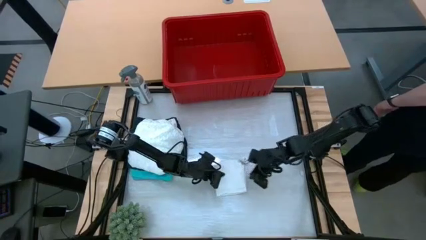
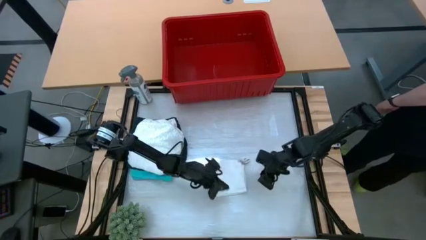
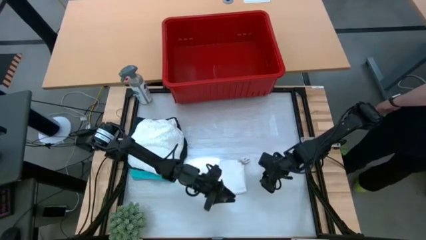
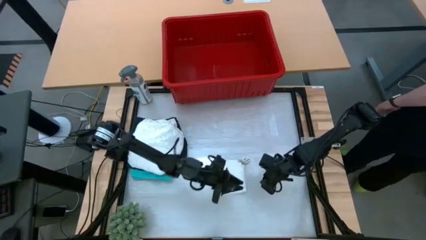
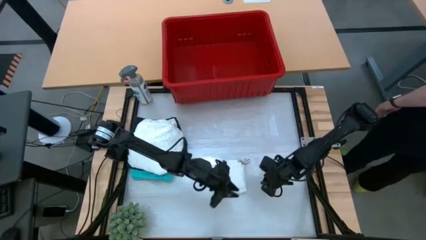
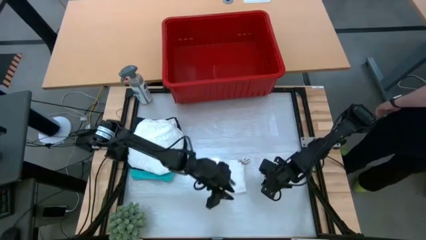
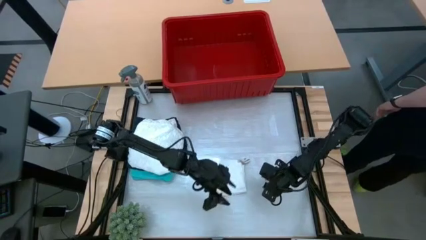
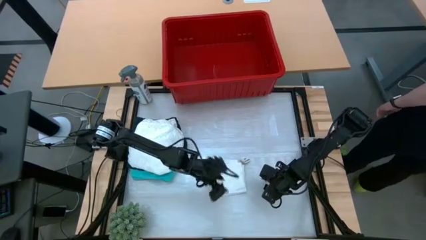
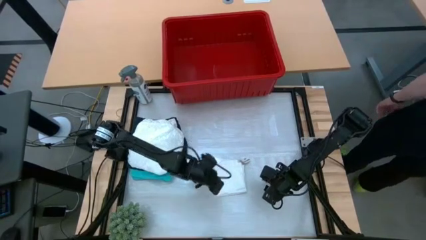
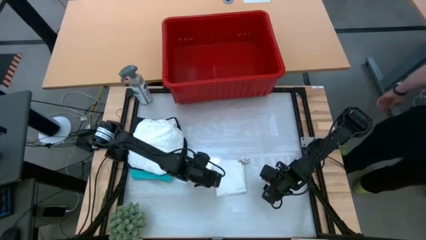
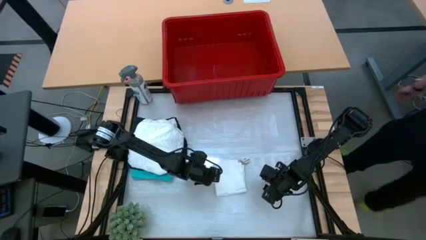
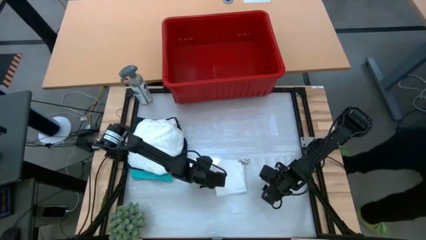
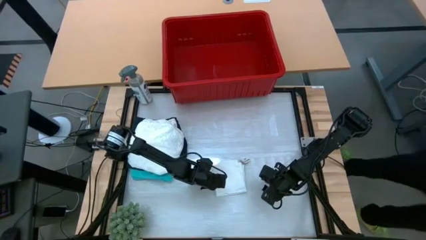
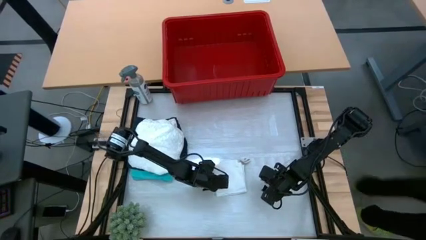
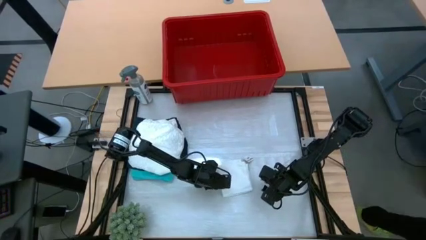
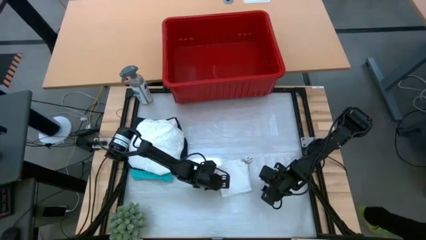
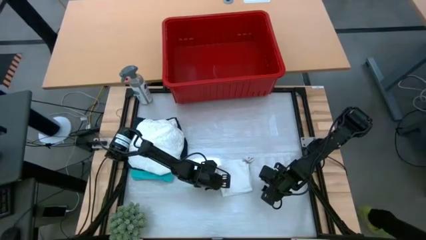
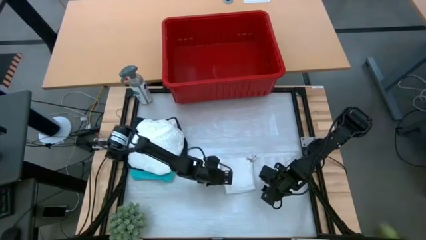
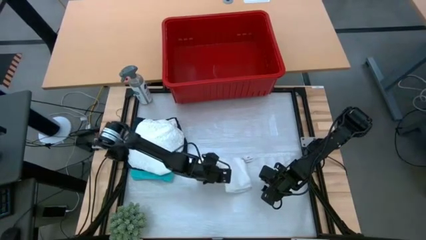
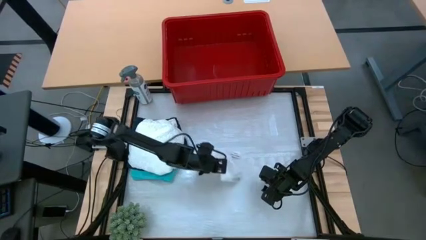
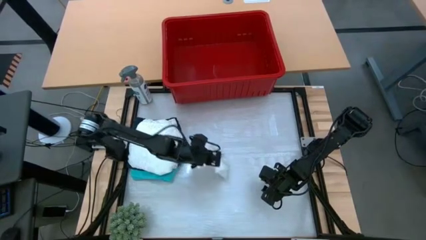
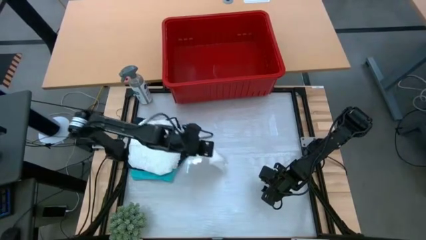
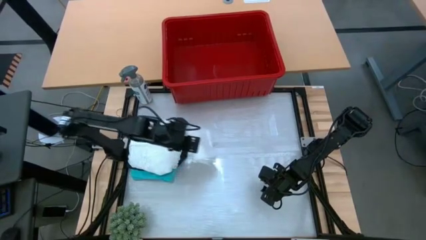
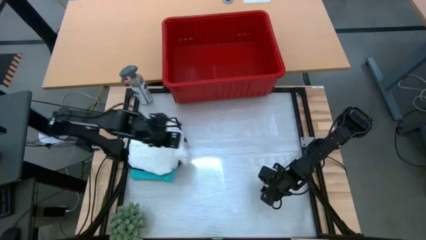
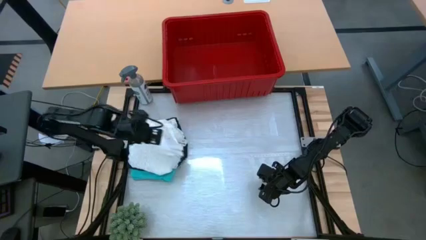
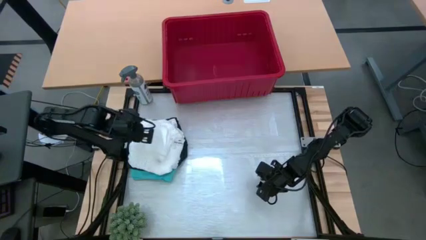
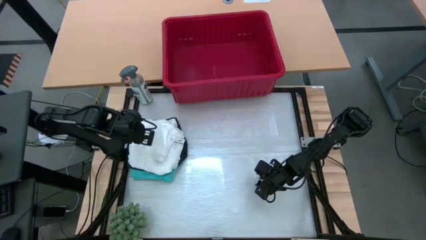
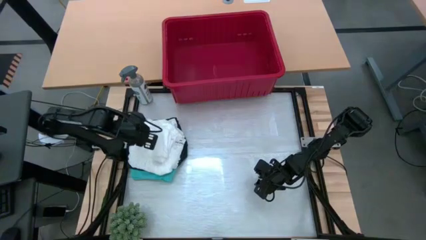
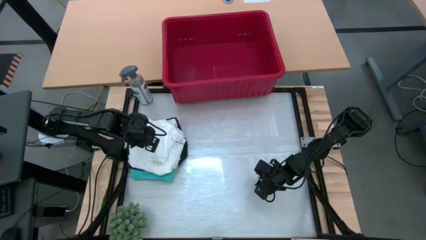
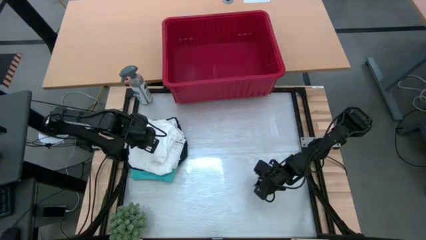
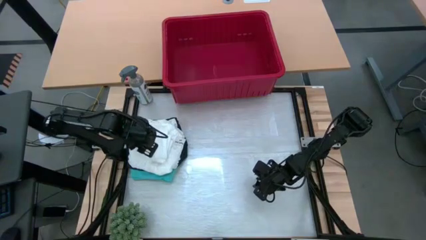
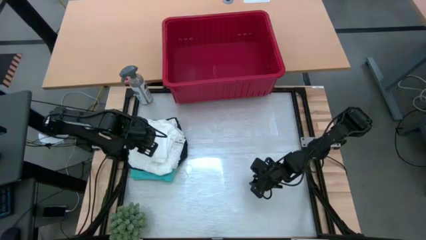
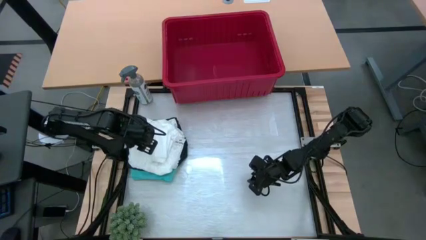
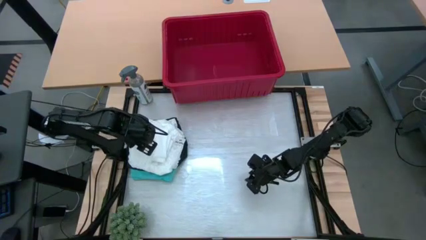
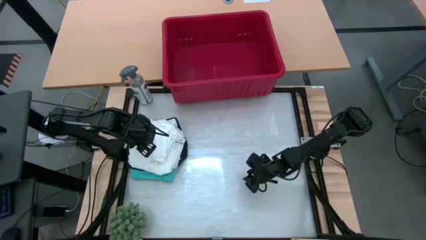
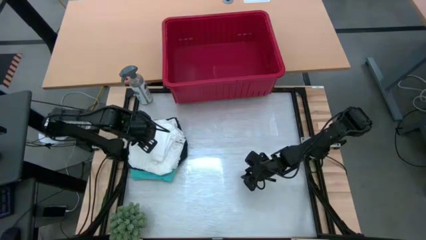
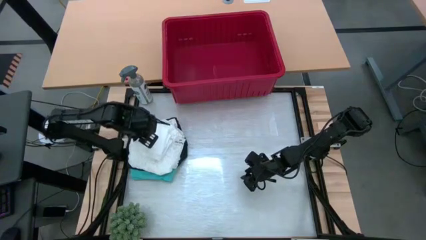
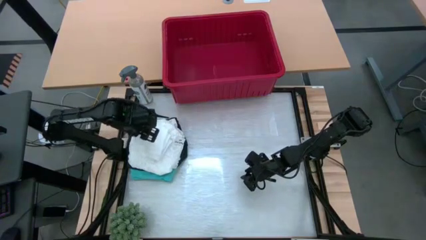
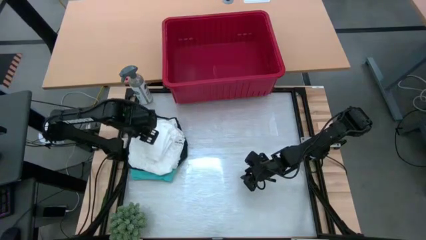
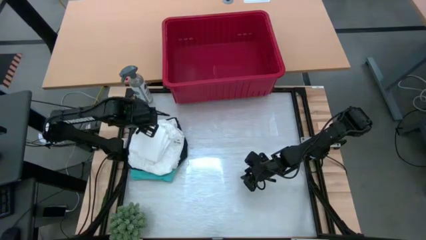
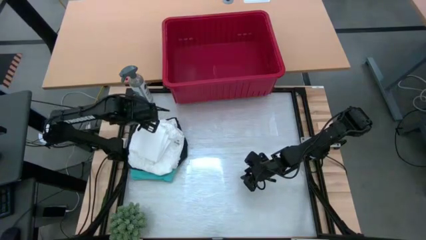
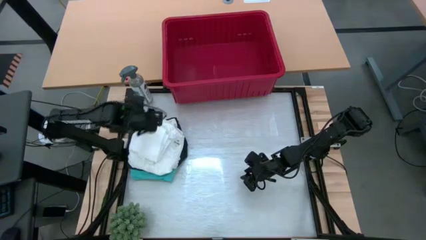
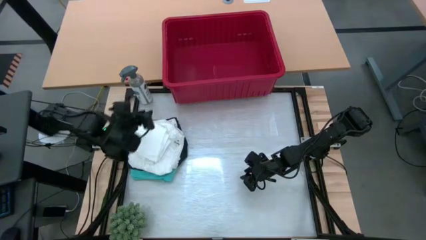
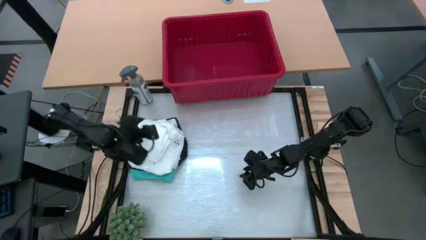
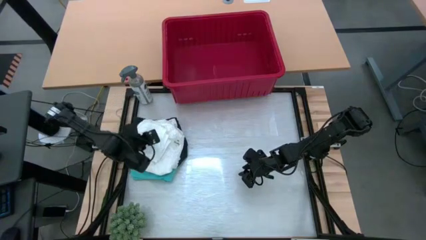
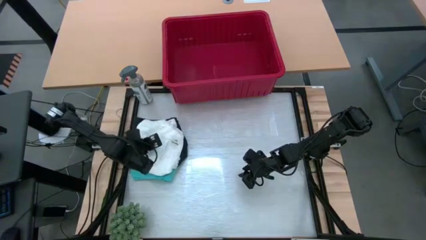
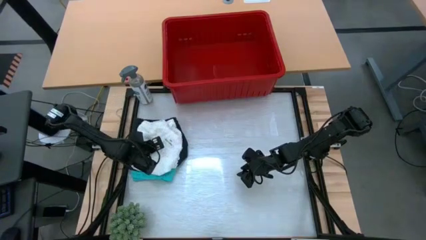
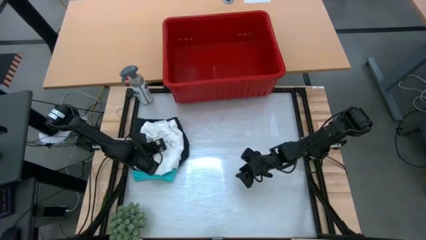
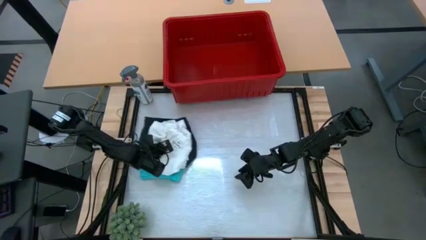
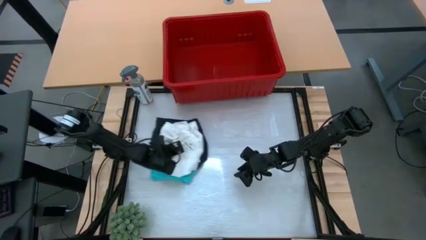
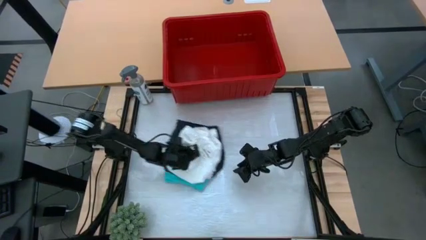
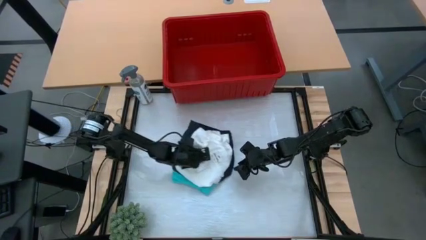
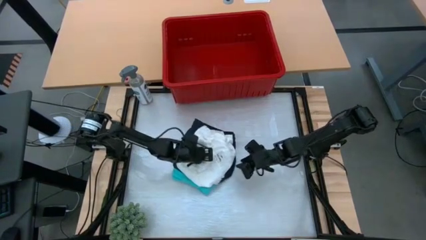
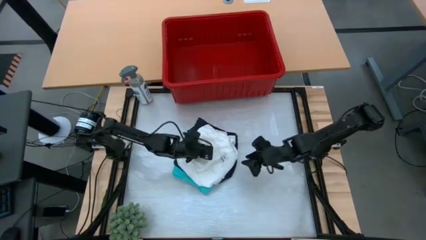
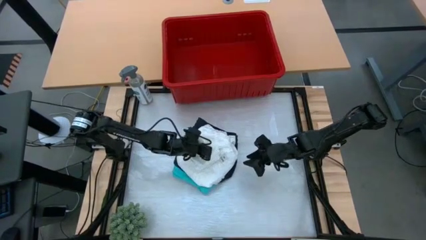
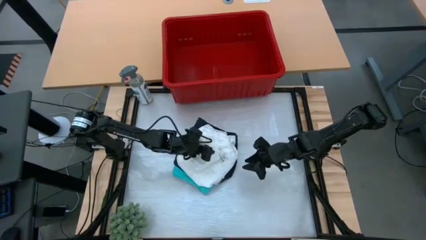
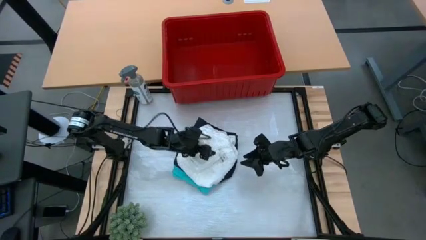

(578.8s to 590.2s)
Task: Fold laundry
Stack the folded white shorts on top of the folded white dress

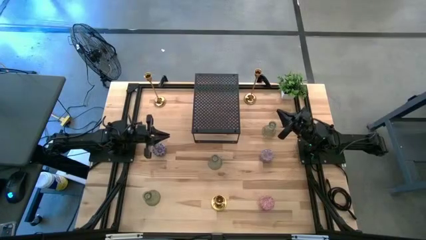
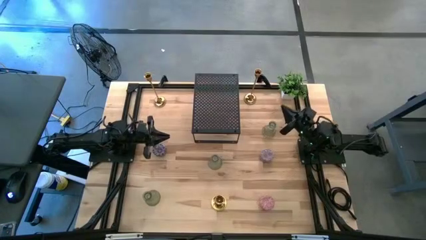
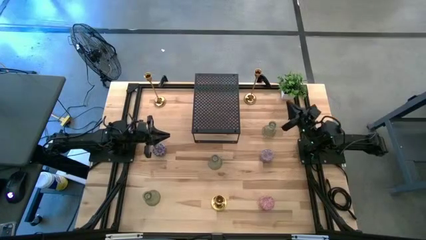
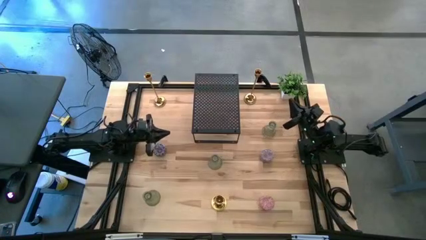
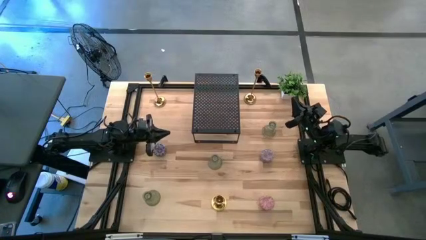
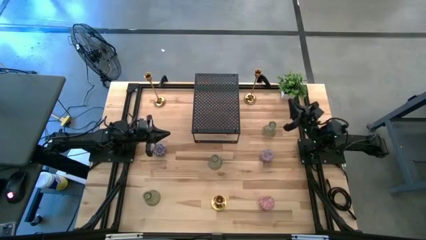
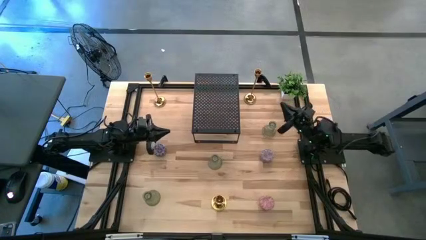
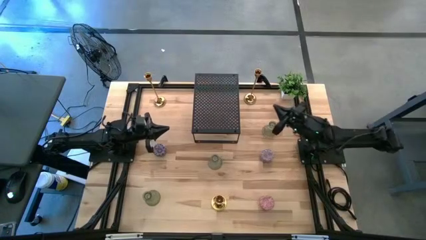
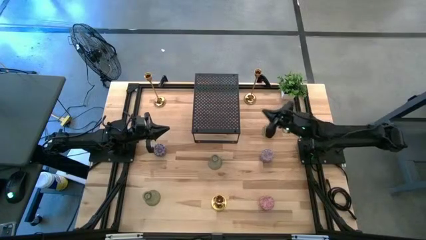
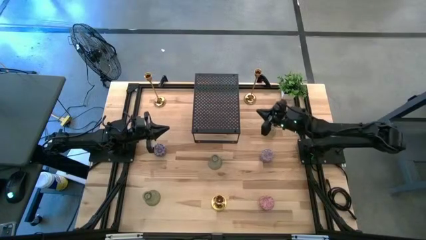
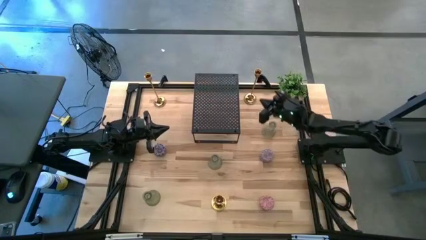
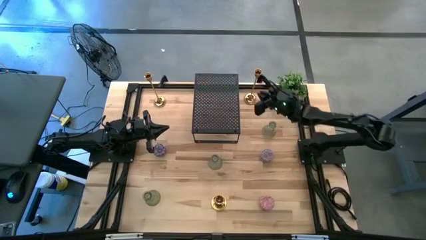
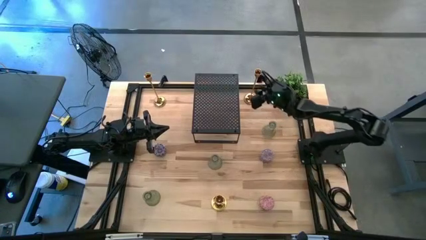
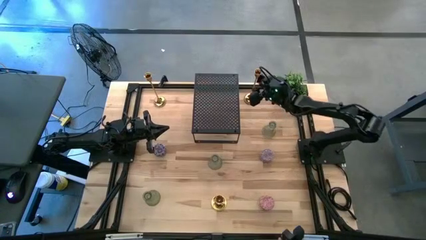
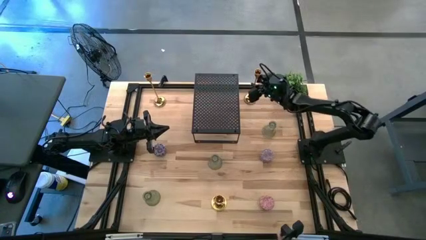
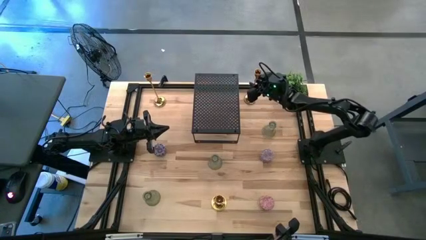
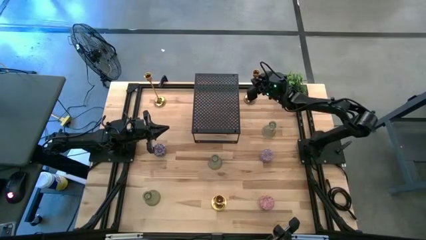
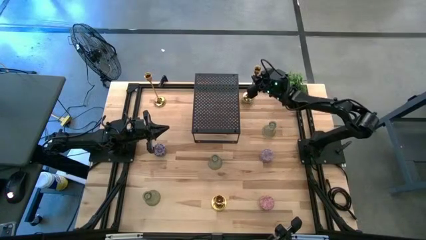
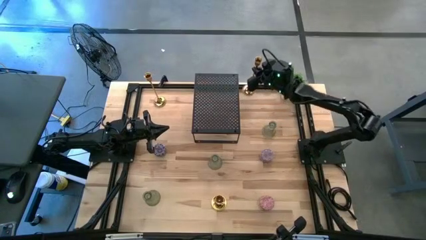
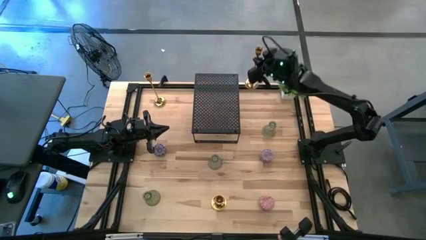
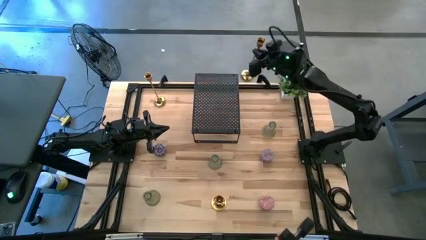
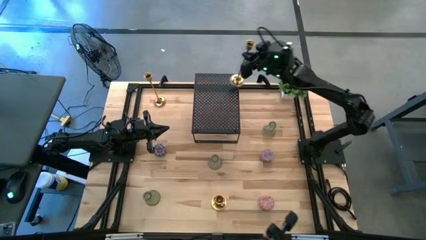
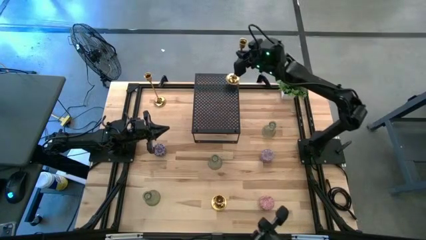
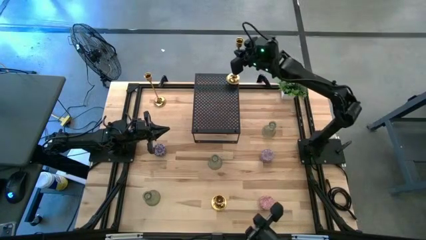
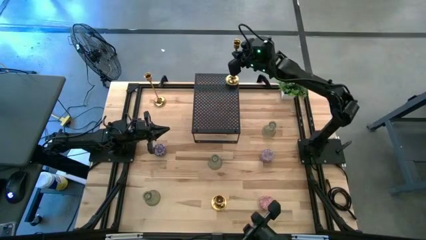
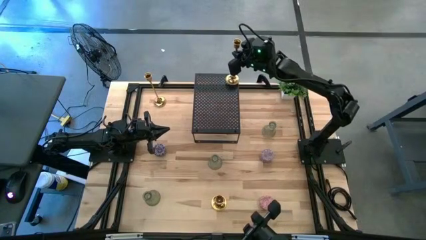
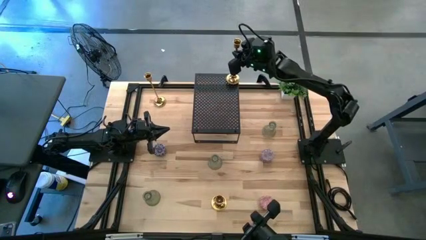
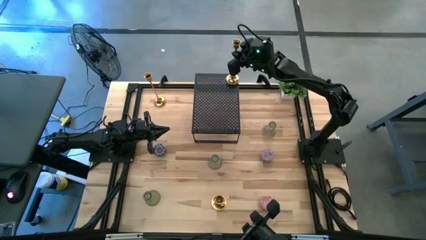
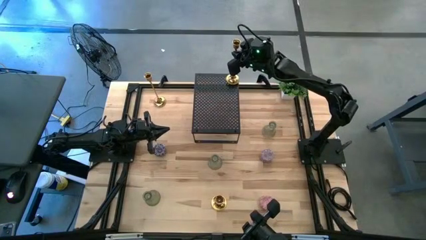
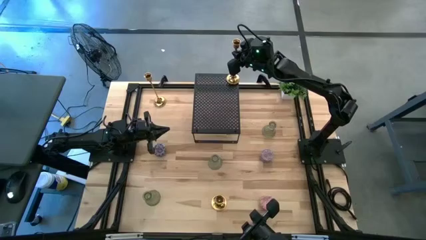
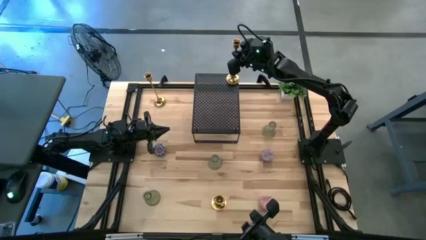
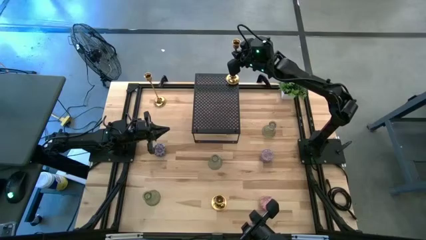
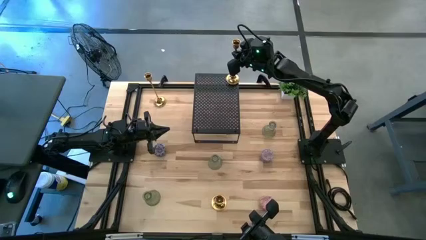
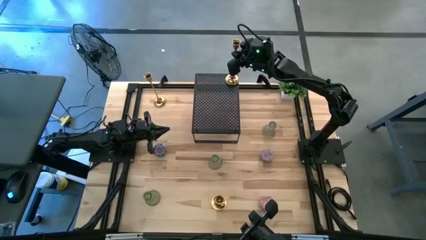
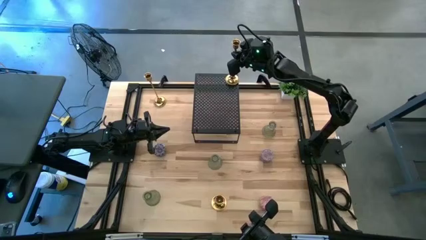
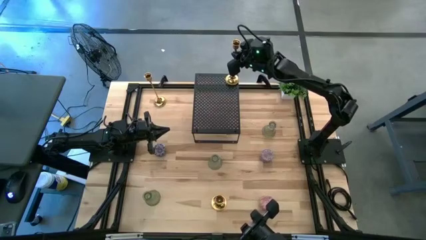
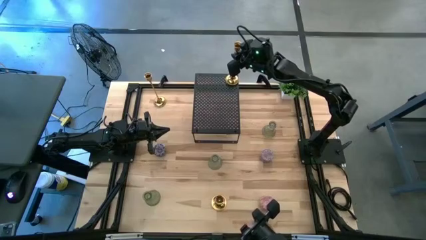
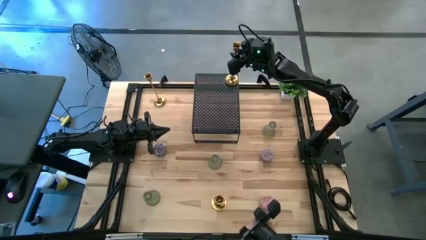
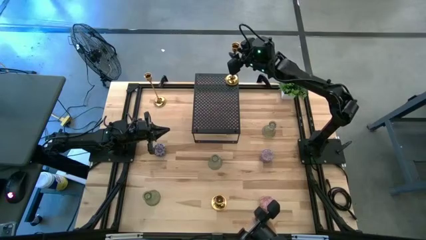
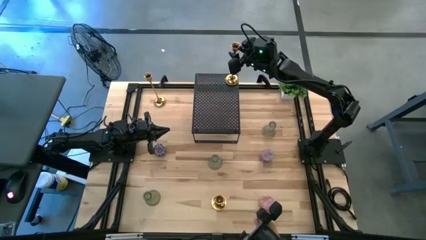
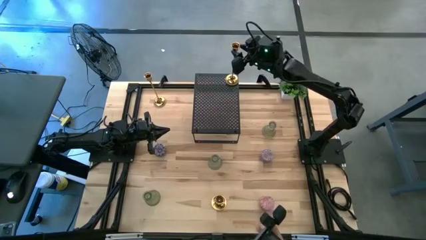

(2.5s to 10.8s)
Task: Pick & Place candle stick holders
Put the top right gold candle holder on the shelf
